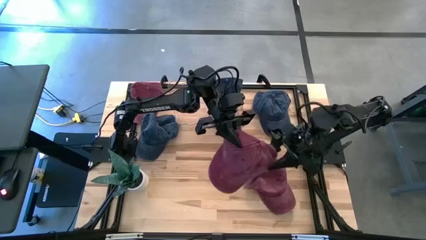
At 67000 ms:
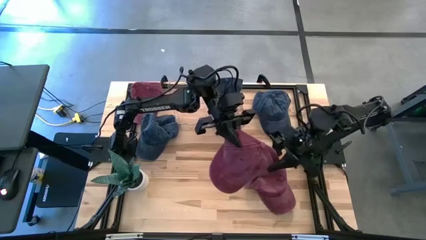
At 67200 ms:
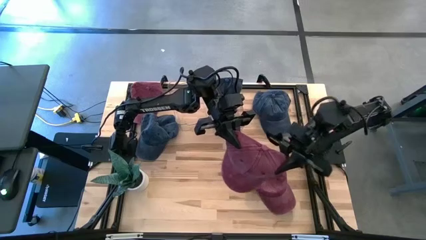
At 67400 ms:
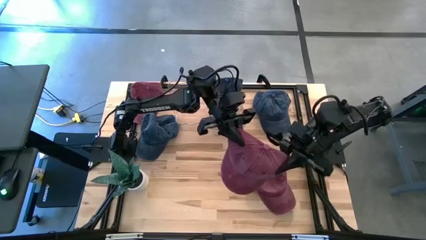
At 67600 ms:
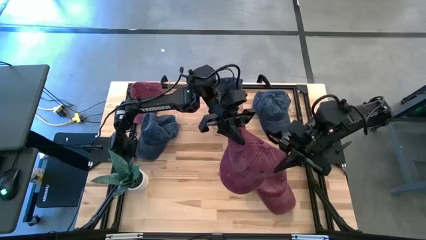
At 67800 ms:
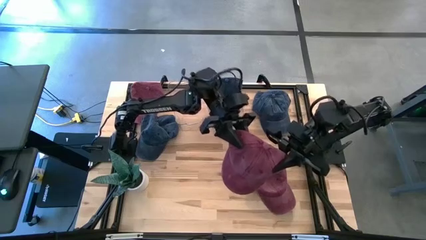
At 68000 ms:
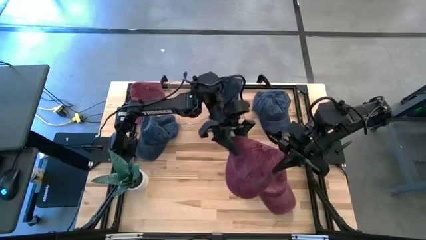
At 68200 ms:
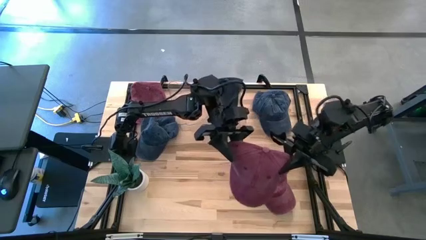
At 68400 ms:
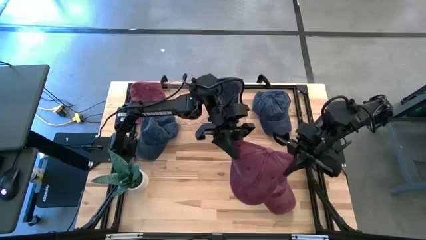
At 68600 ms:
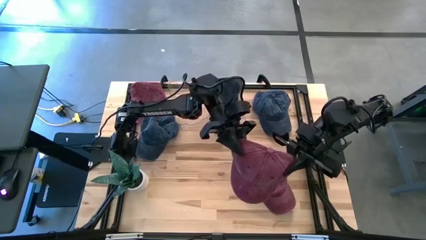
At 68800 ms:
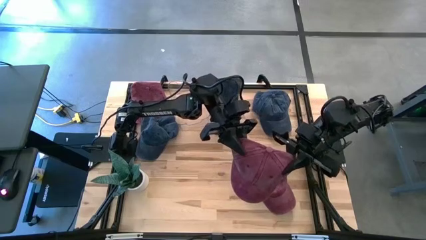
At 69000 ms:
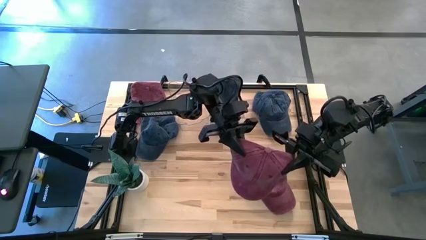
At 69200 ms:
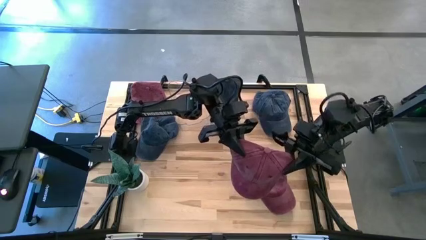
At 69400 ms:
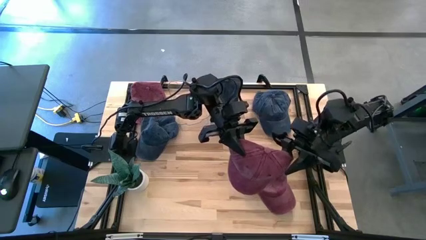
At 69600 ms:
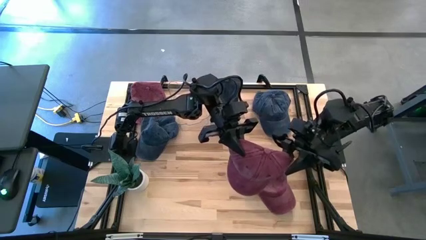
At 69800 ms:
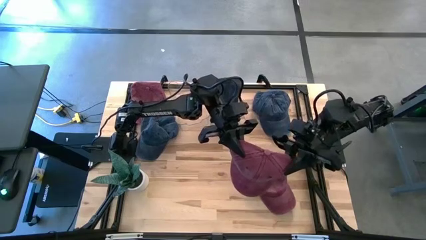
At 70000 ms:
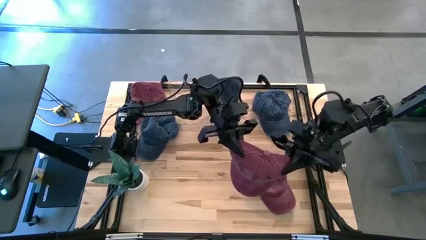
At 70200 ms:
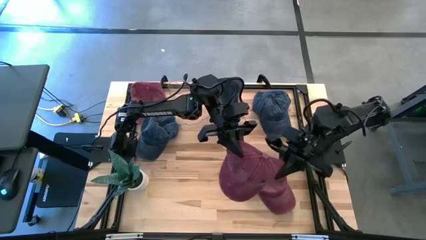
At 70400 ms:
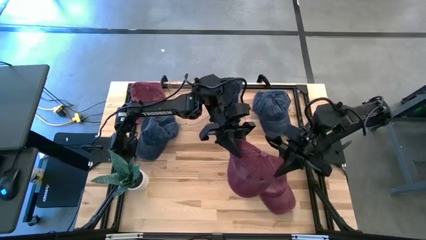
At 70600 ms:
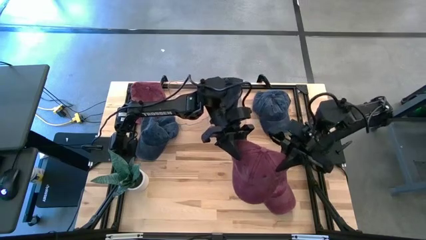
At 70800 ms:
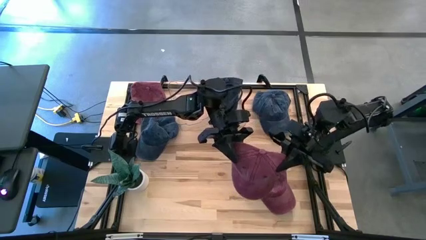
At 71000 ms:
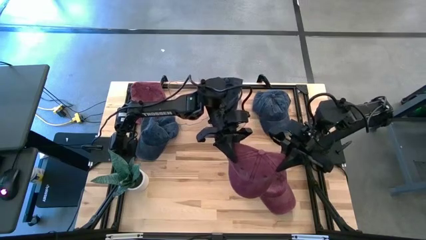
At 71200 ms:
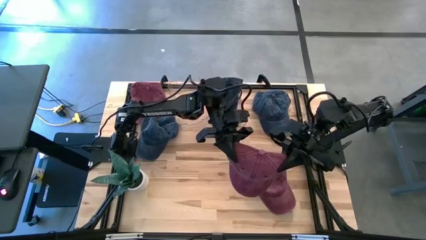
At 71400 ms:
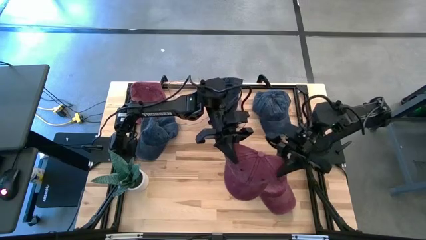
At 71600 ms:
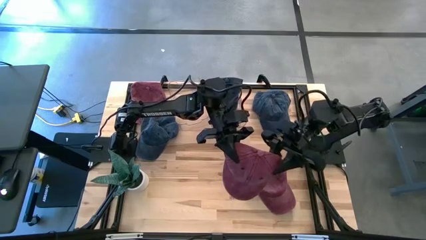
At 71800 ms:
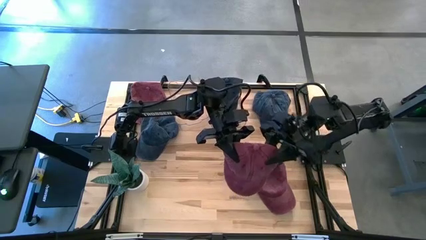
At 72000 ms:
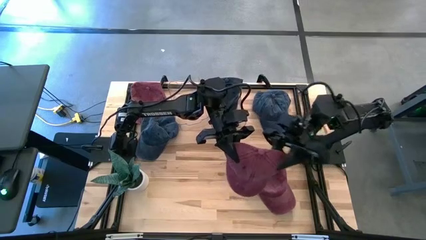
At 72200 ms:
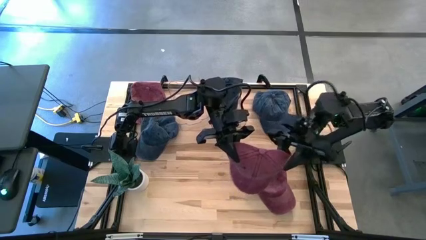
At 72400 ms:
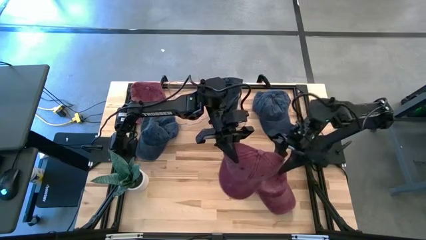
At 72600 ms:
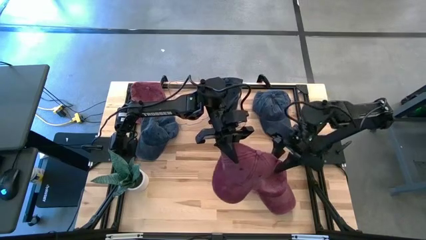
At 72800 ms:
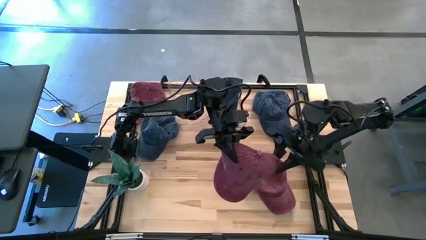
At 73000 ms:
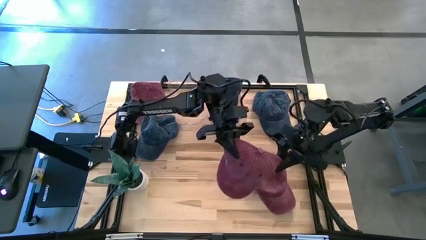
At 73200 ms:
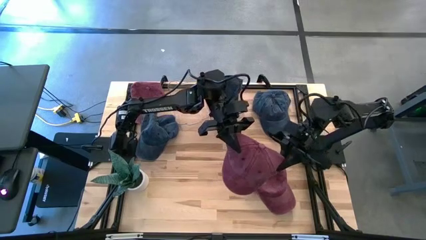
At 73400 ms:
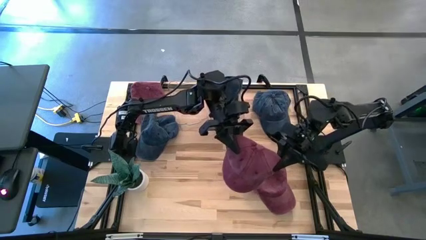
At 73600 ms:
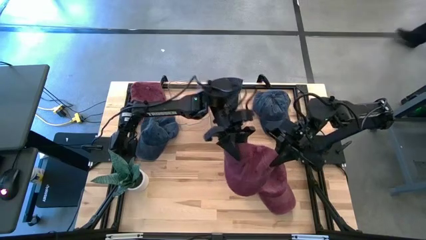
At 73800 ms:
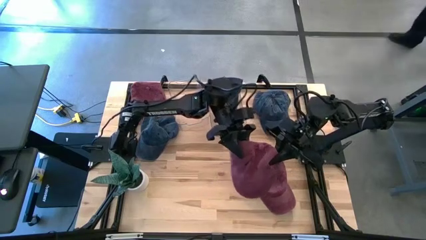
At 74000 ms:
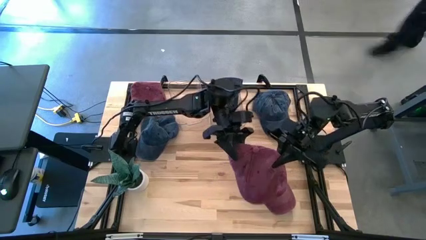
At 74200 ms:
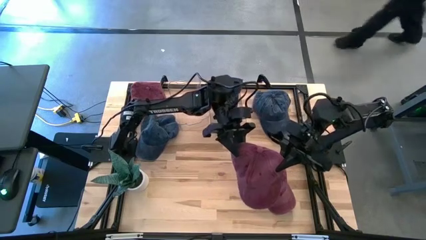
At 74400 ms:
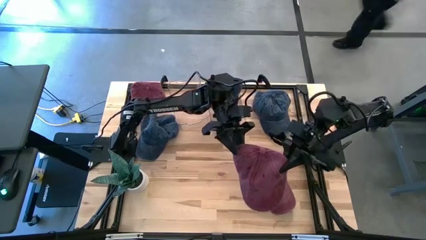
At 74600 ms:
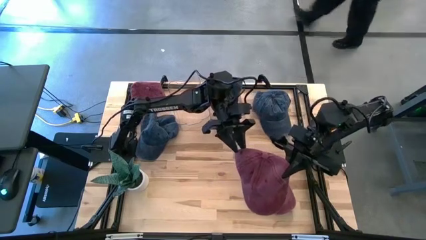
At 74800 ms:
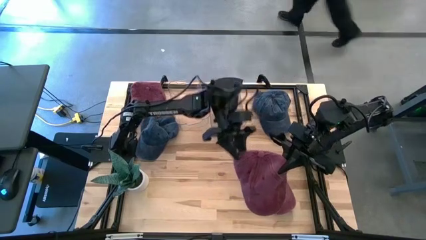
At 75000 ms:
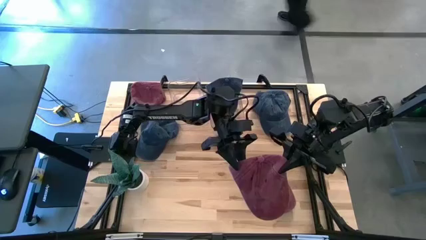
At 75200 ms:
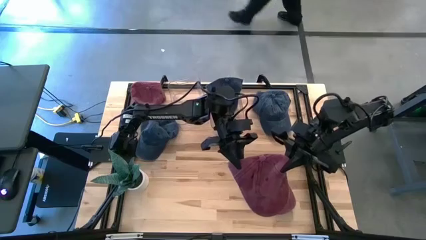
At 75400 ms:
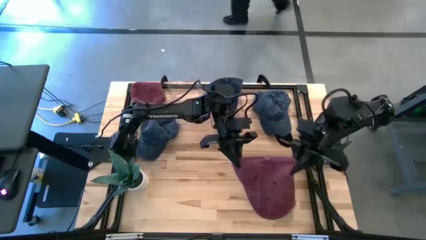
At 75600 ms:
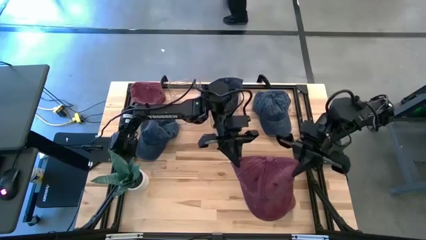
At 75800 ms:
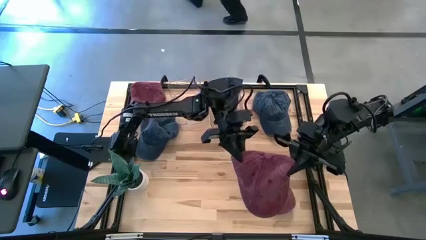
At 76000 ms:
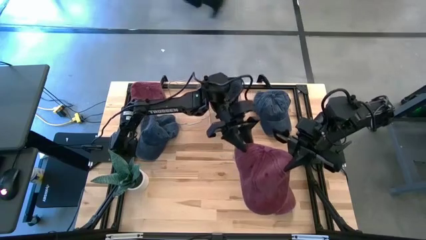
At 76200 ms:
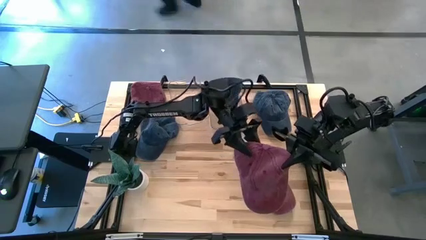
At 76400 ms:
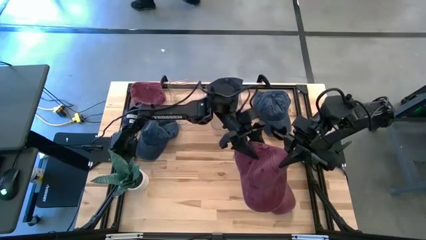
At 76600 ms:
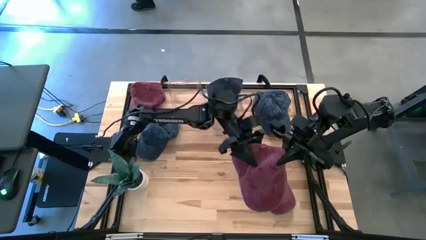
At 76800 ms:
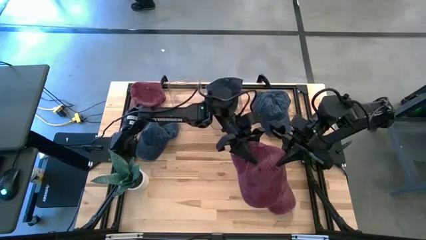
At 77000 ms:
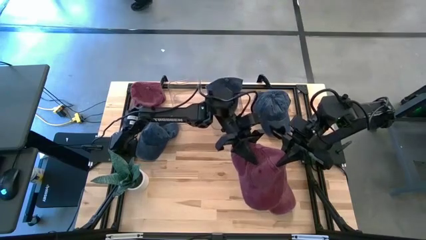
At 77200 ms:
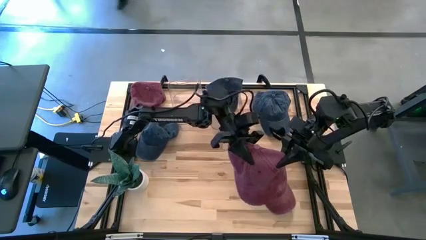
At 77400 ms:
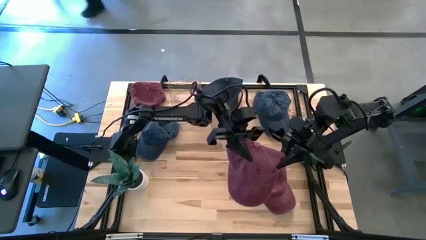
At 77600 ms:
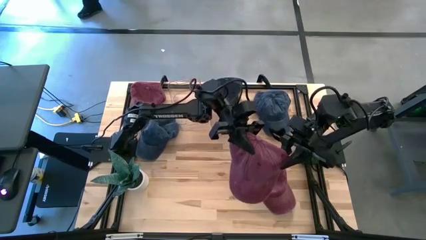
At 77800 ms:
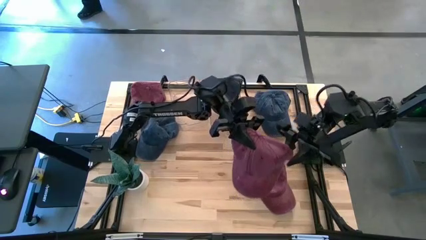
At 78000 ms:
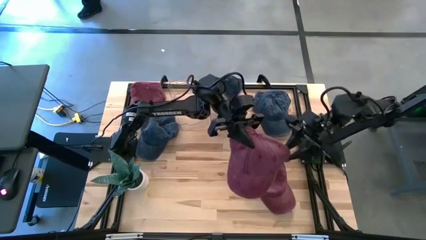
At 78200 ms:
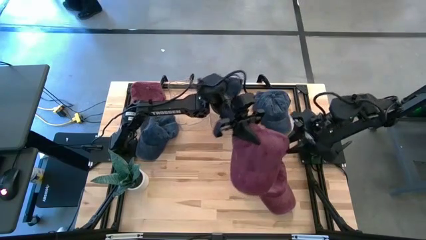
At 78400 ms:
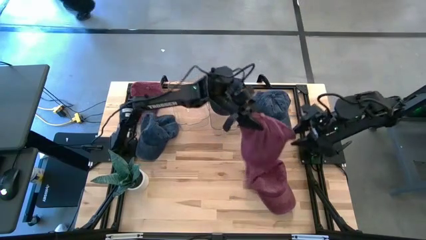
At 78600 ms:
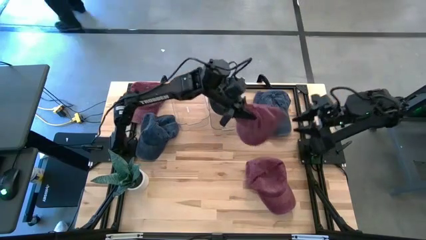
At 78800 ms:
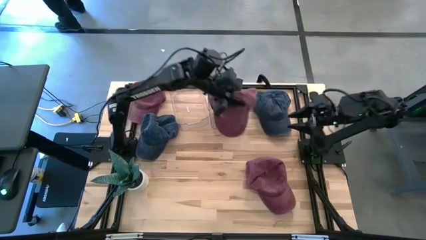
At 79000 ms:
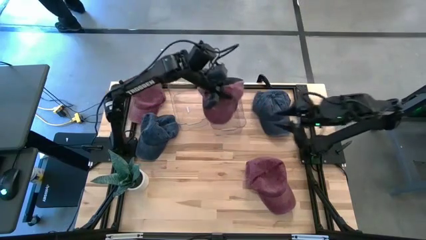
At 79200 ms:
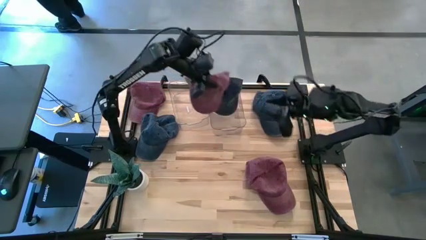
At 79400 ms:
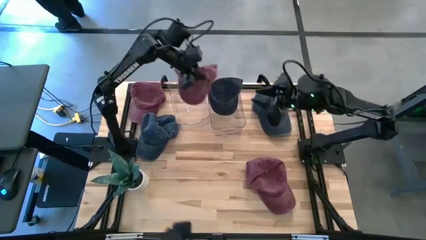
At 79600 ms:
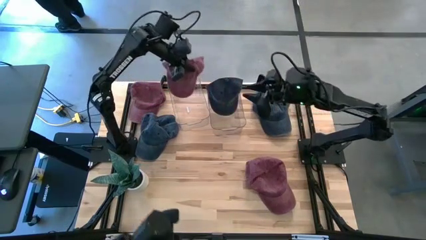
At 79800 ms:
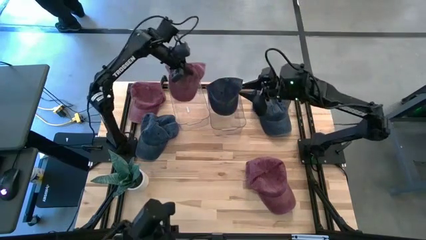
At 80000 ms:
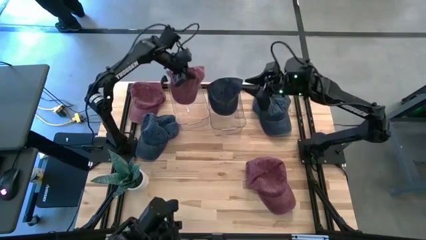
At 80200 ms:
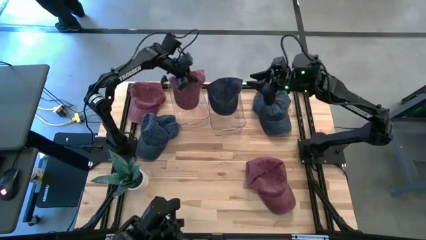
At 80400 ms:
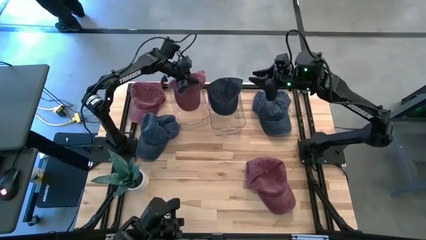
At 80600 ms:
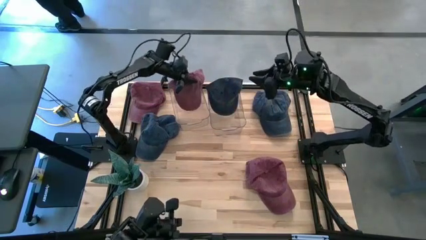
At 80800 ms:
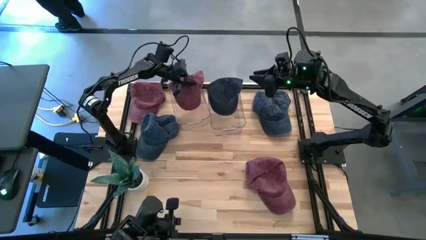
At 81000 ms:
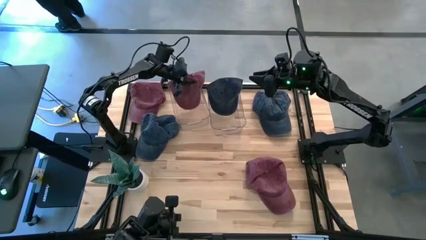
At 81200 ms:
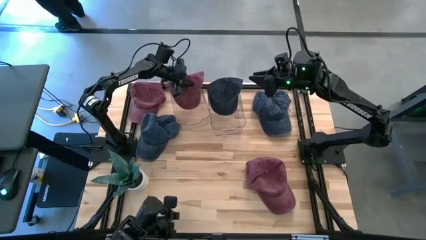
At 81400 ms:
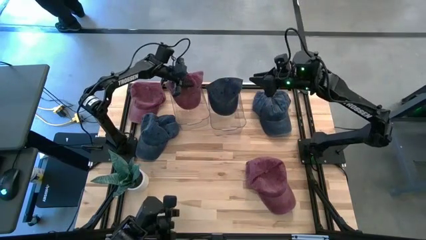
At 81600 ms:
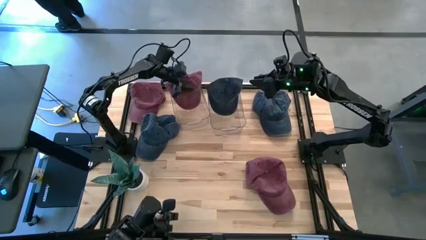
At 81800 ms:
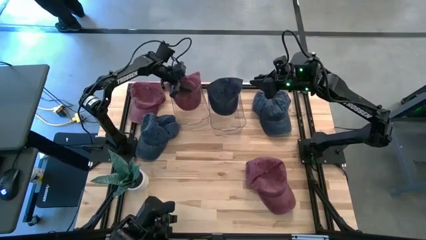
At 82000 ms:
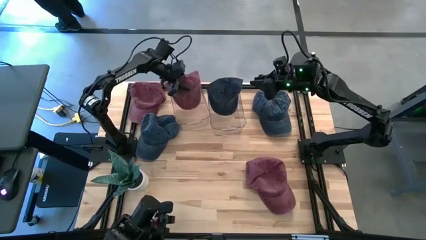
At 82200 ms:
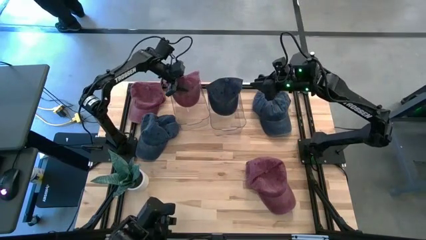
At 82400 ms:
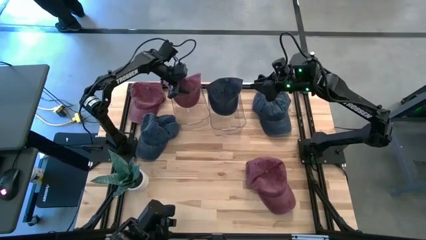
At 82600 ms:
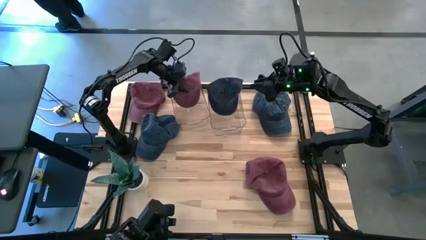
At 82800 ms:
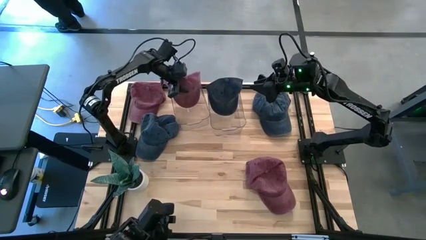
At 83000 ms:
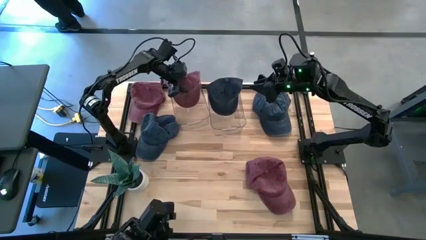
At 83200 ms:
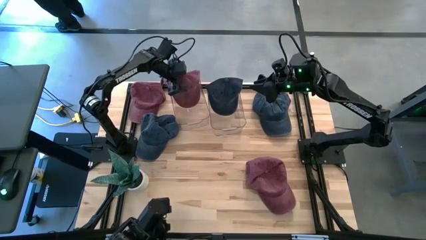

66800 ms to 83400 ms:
Task: Pick & Place hat
Put the bottom left red cap into the left bin
